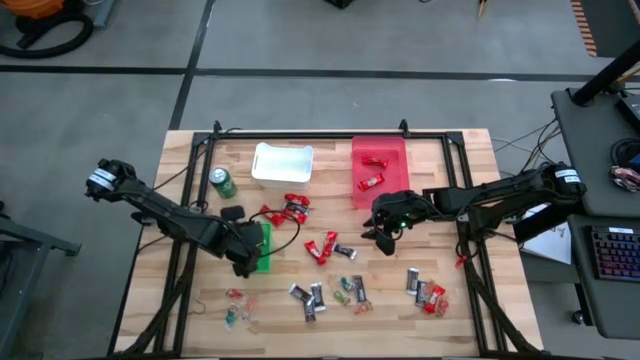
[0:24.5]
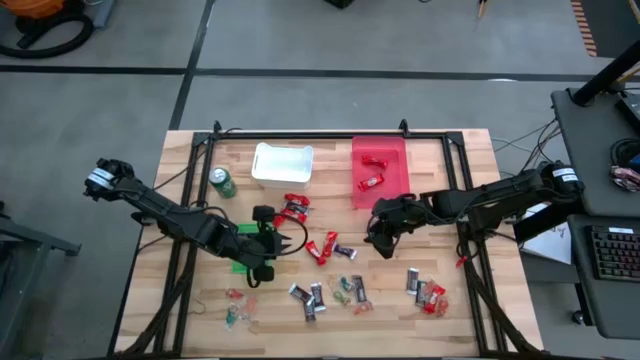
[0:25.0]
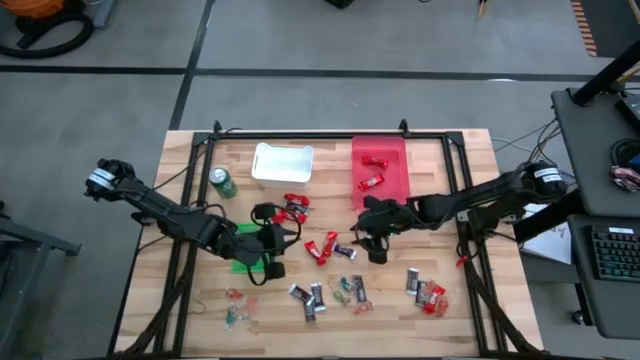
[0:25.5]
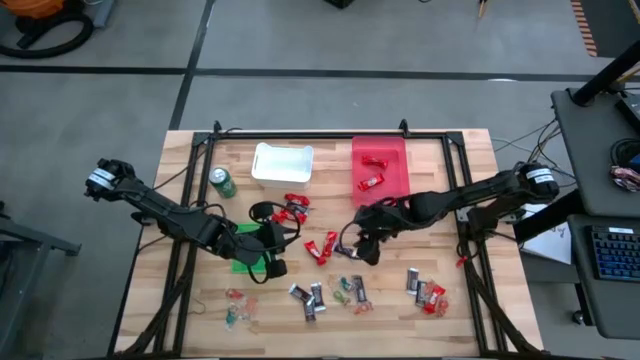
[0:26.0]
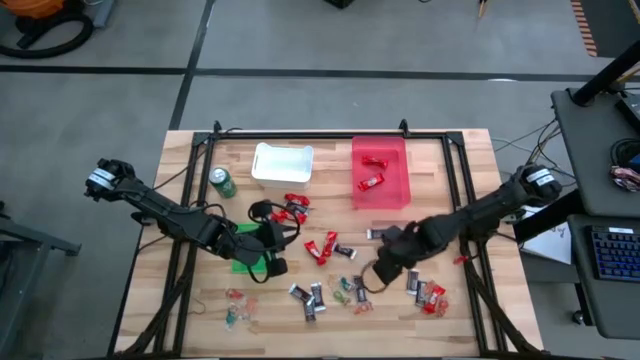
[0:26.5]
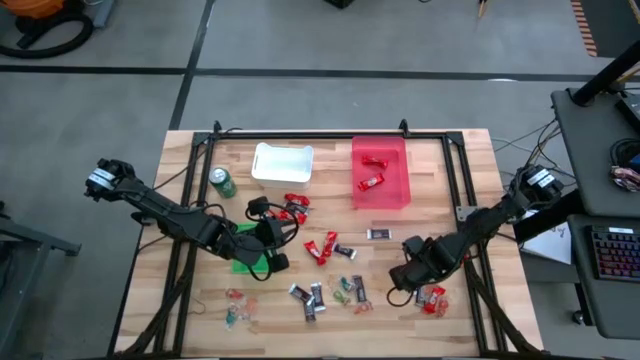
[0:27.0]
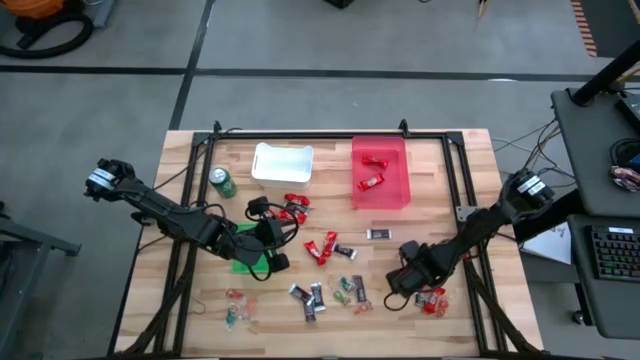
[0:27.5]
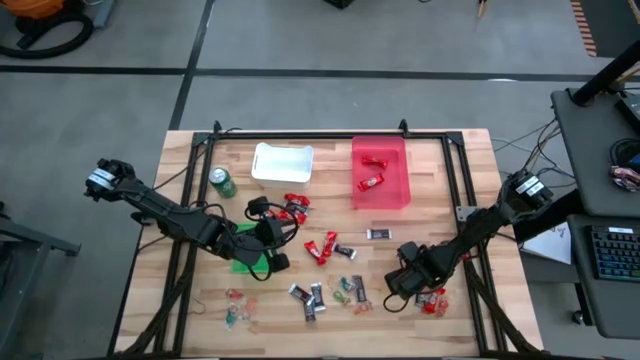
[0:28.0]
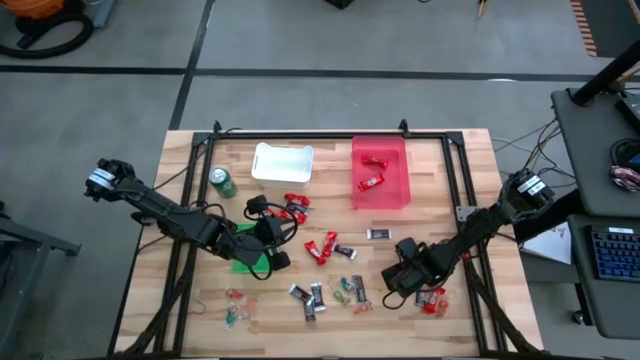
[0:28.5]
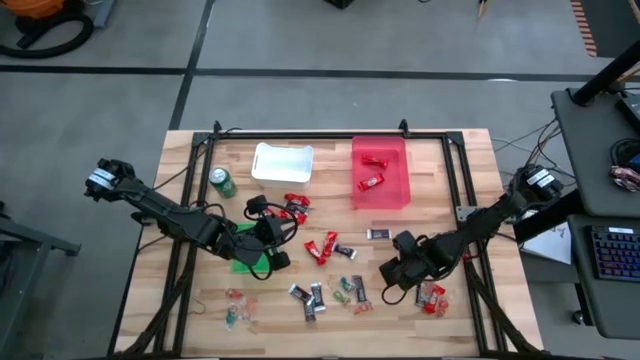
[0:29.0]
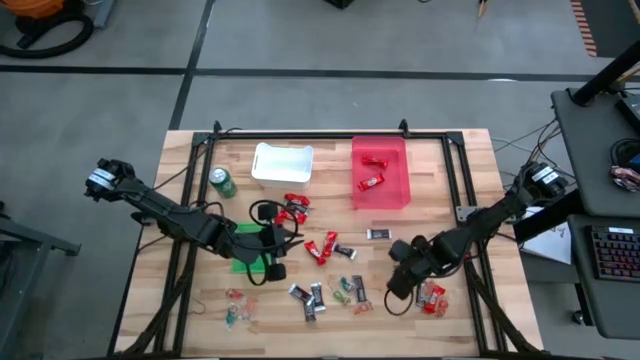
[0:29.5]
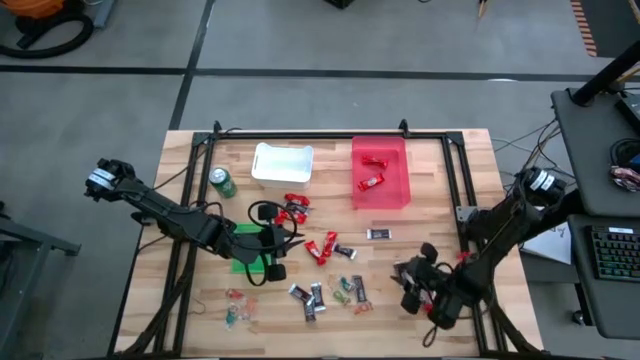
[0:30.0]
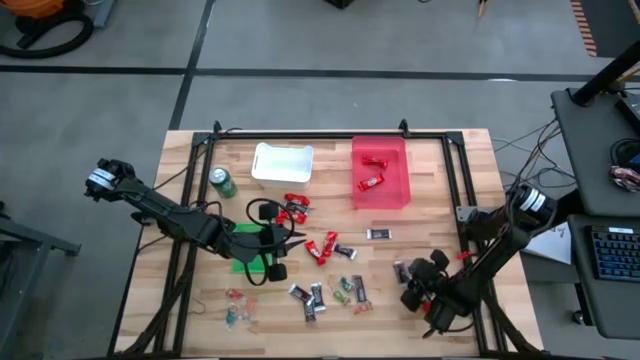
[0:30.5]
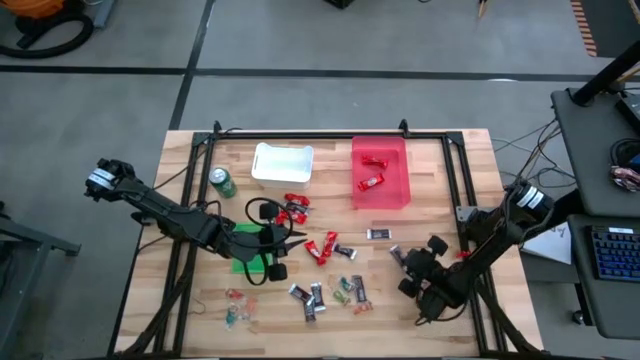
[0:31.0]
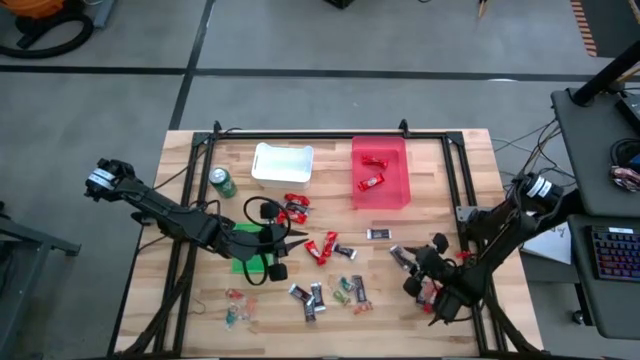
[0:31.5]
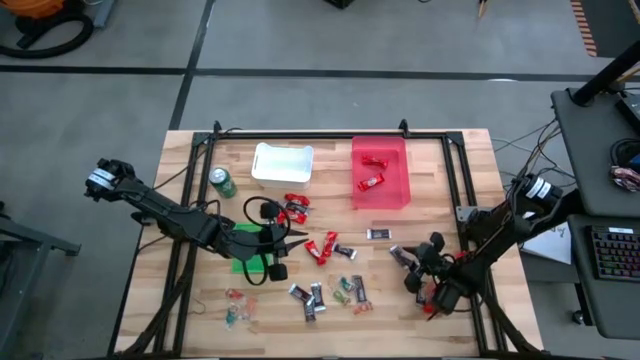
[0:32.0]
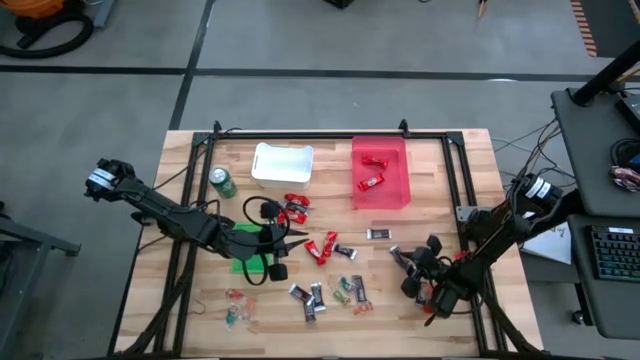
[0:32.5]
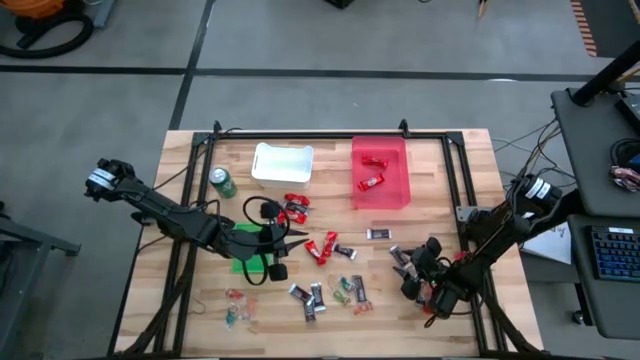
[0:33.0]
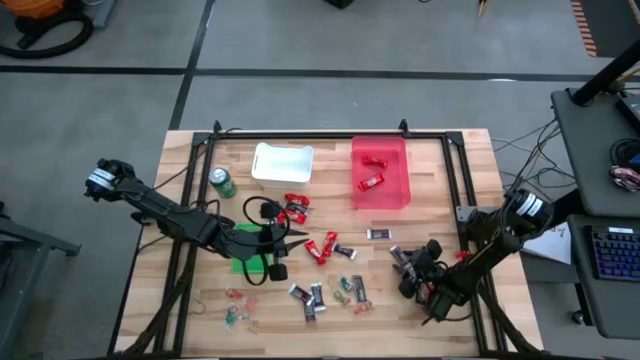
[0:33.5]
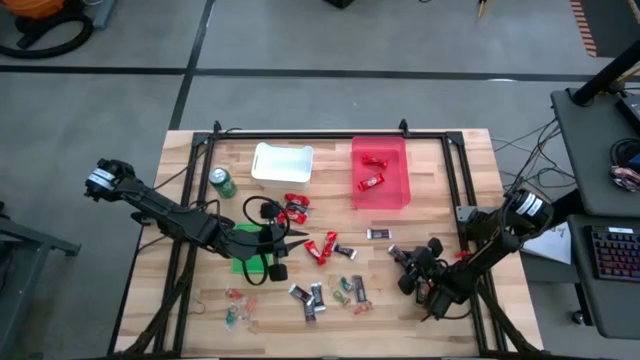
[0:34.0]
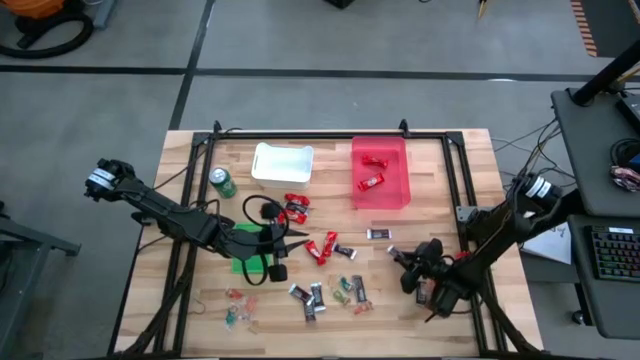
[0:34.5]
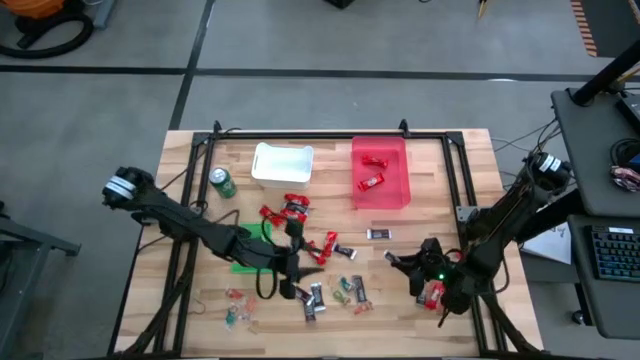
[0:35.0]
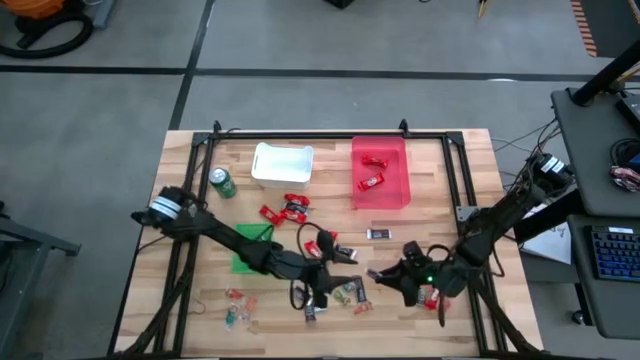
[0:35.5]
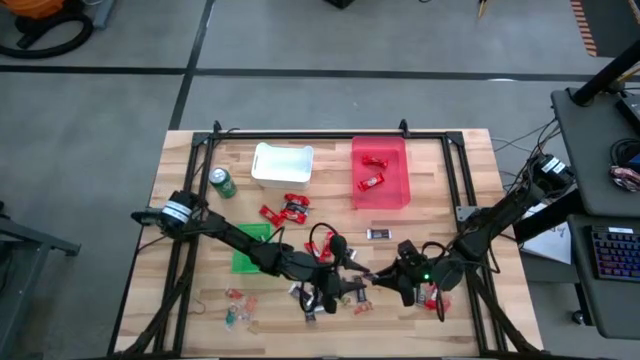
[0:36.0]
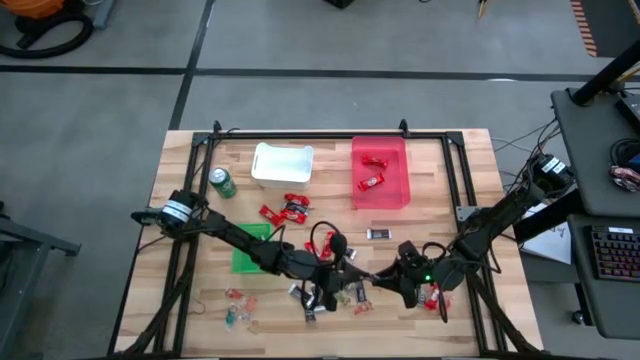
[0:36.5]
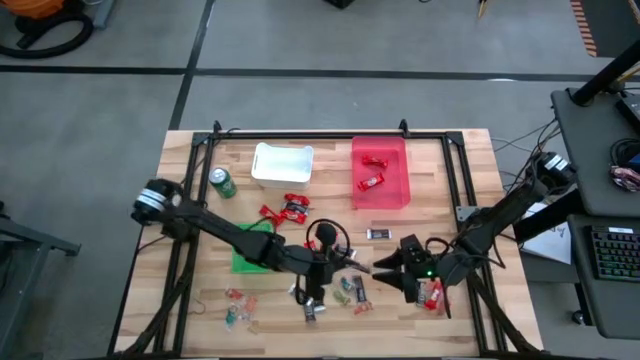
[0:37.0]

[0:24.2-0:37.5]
Task: Organize candy in baskets
Put the brown chocolate into the green basket

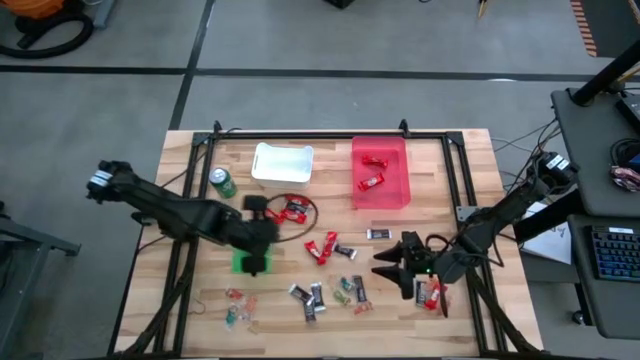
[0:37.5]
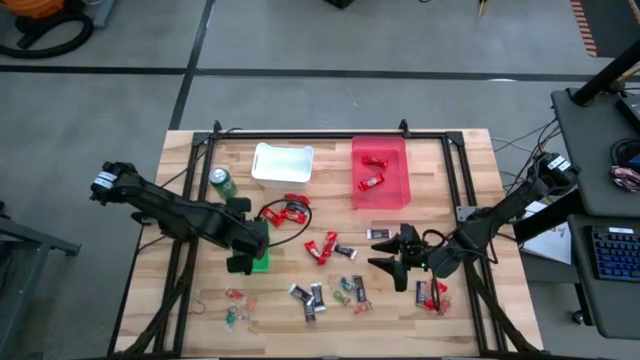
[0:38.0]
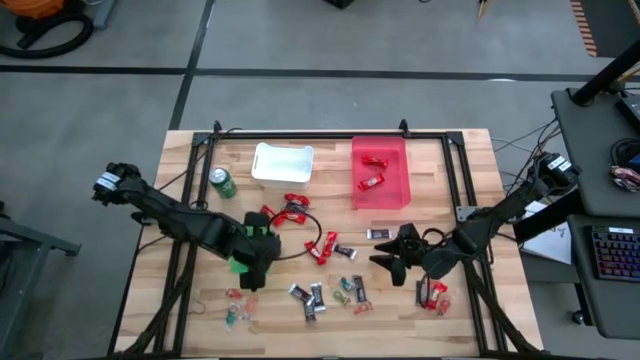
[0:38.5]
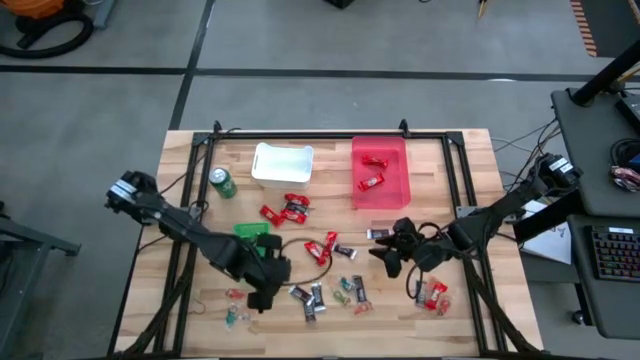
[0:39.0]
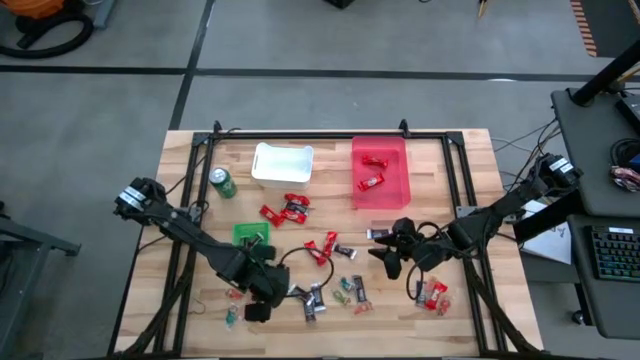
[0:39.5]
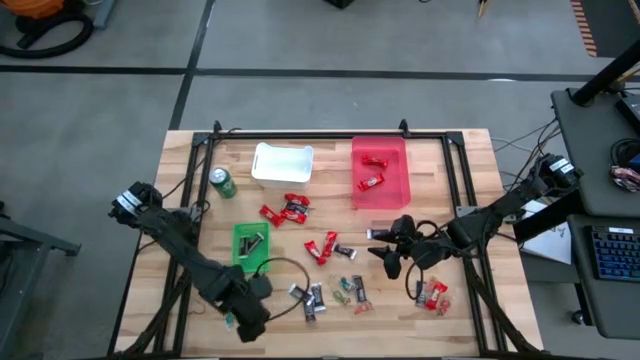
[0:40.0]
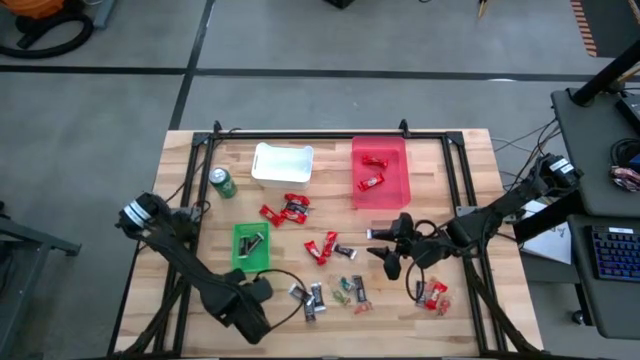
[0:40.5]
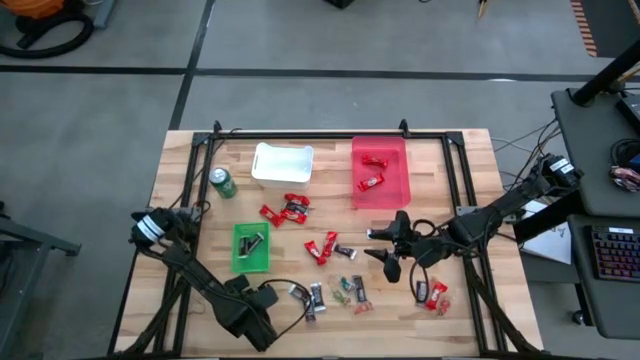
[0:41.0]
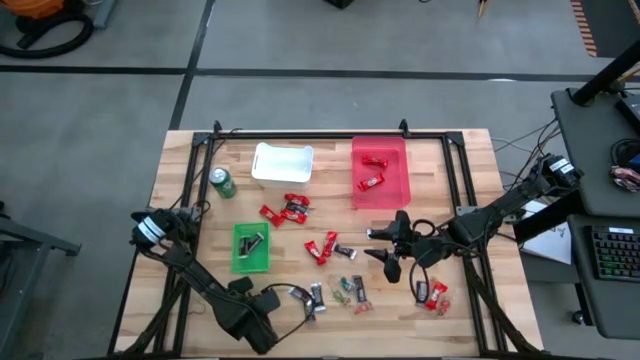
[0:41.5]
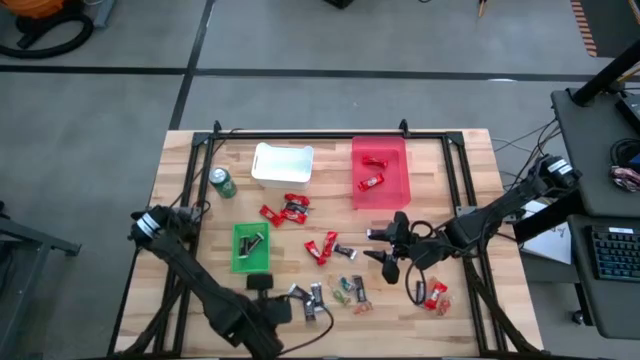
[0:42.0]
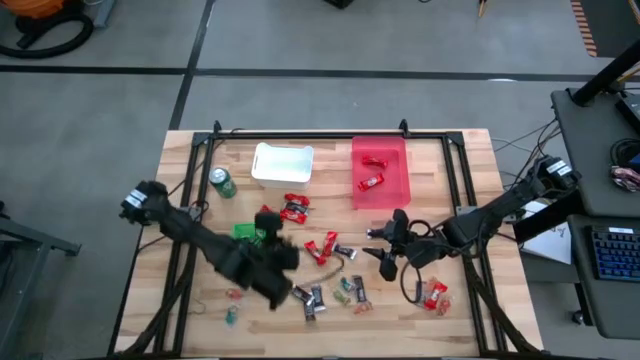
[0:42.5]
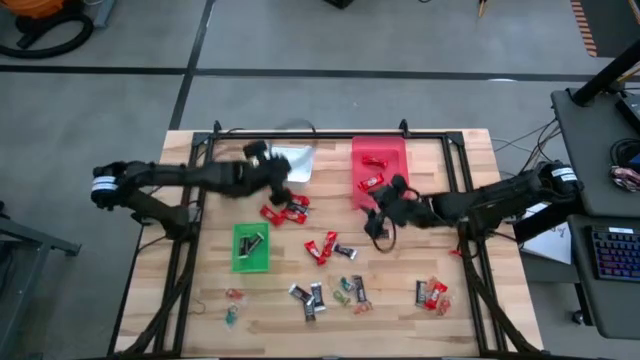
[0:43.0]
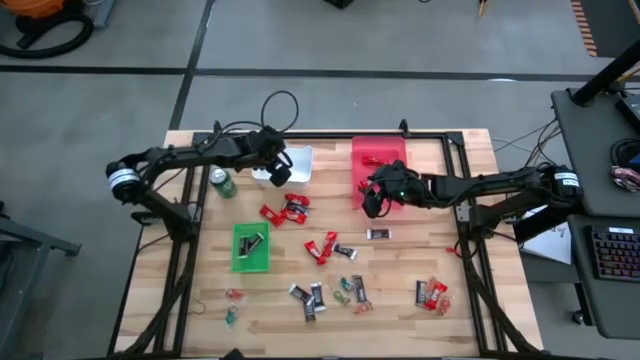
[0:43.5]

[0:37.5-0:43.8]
Put the orange gummy into the white bin
